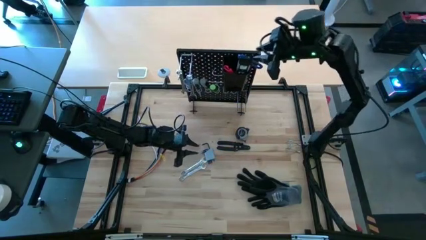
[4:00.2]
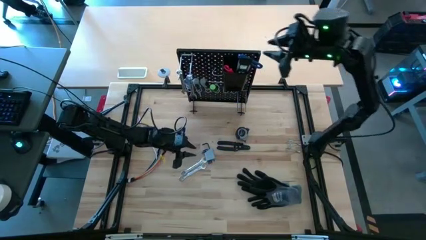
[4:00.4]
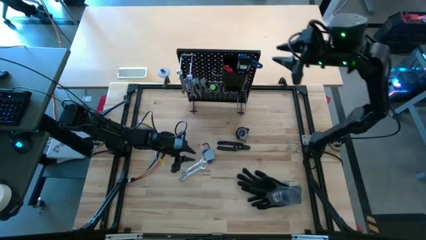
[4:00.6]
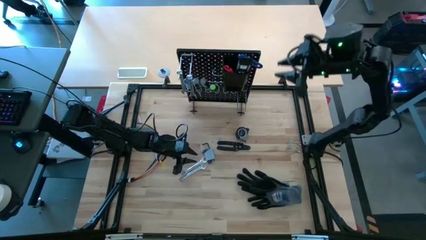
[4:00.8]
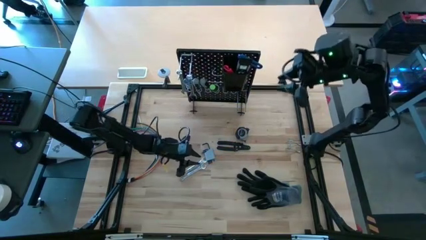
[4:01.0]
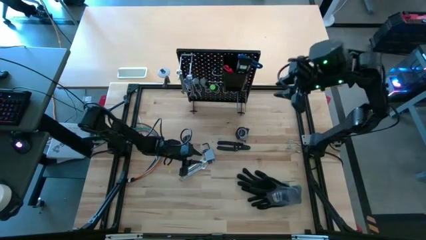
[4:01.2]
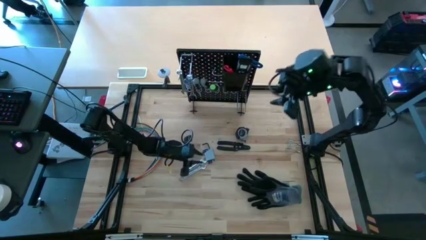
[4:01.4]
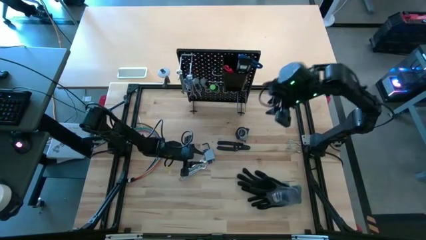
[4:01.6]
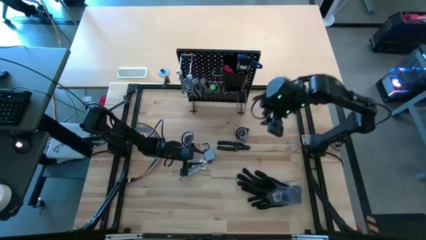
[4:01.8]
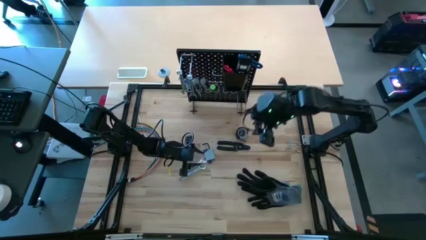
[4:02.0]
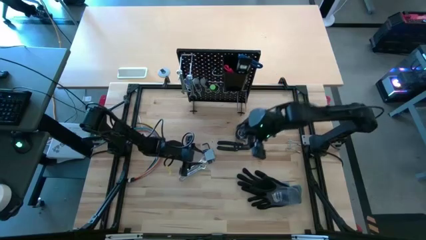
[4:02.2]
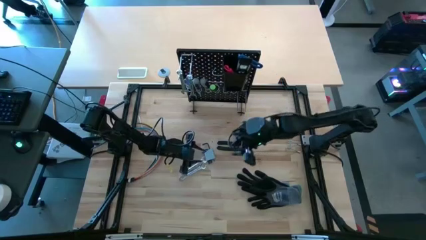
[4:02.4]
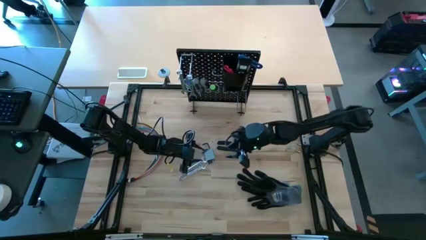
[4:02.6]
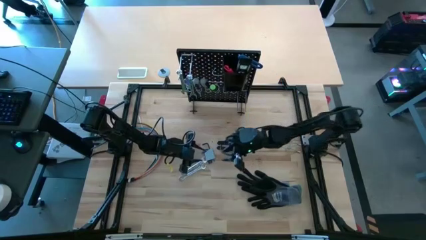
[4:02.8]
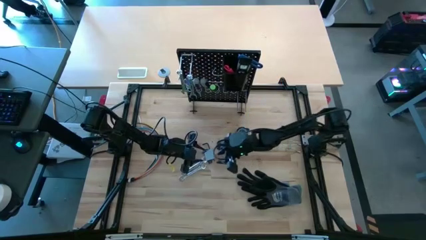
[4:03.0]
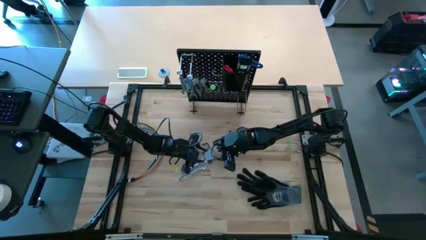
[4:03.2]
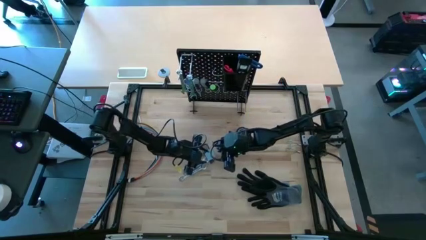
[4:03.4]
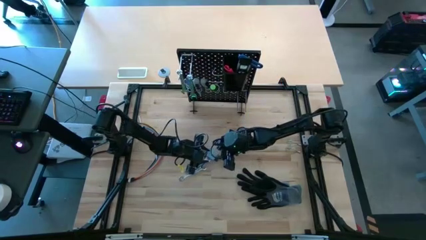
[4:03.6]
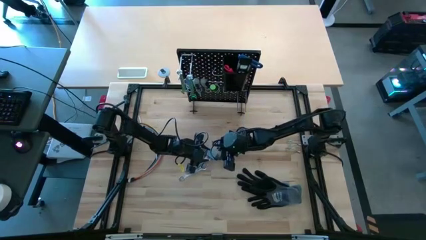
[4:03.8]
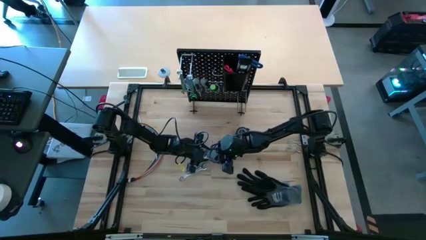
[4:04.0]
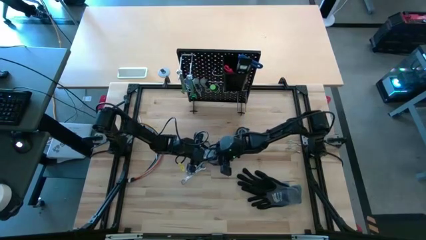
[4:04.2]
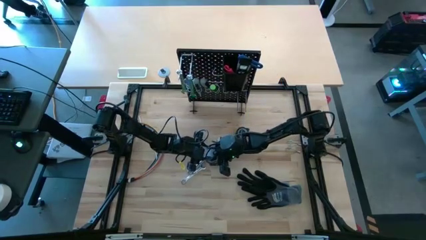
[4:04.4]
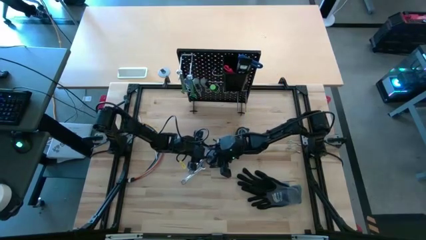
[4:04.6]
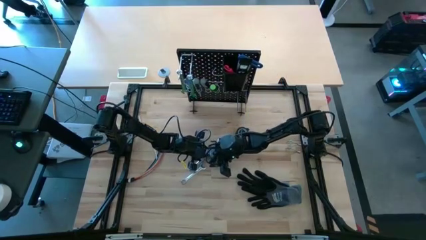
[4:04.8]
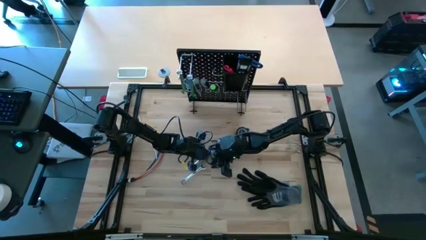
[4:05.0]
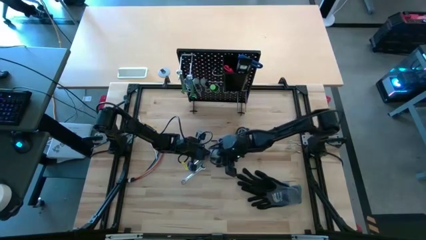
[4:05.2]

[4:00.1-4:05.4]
Task: Hang tools onto peg board
Put the gray hex key set into the black bin on the peg board

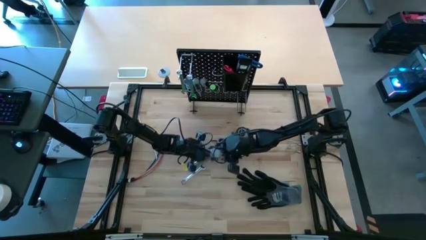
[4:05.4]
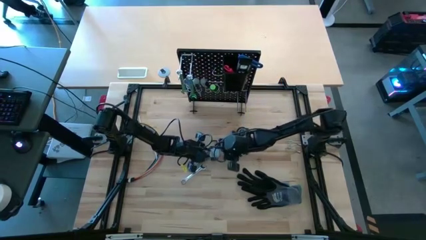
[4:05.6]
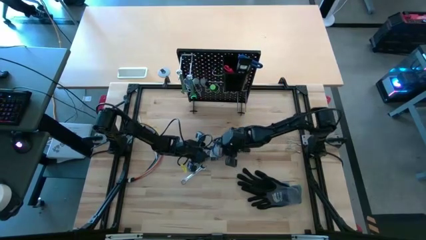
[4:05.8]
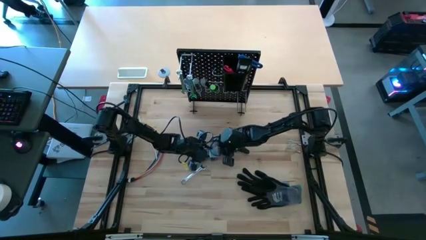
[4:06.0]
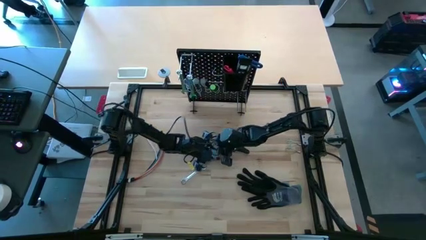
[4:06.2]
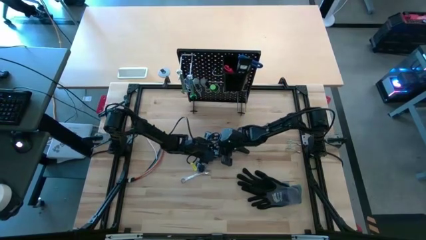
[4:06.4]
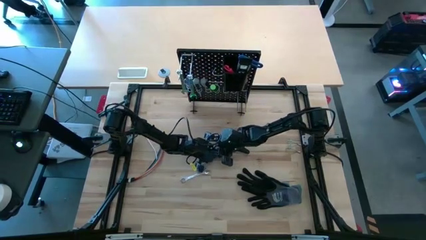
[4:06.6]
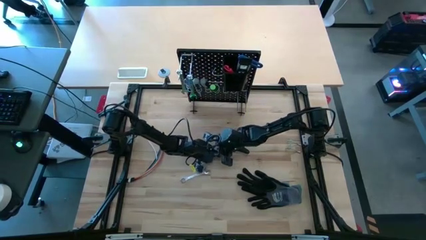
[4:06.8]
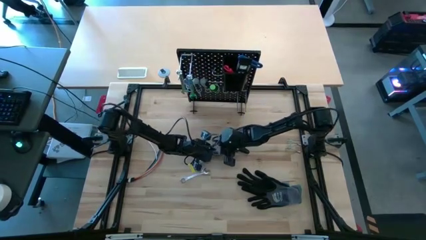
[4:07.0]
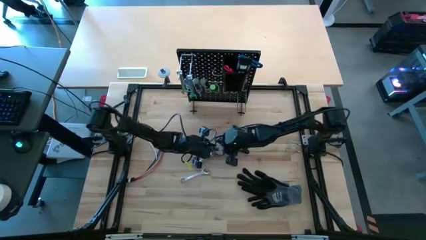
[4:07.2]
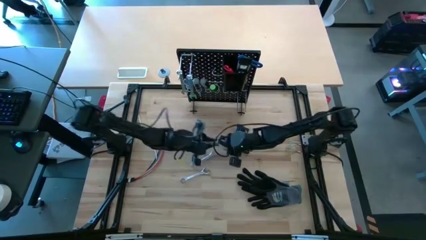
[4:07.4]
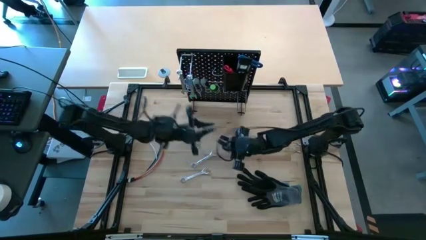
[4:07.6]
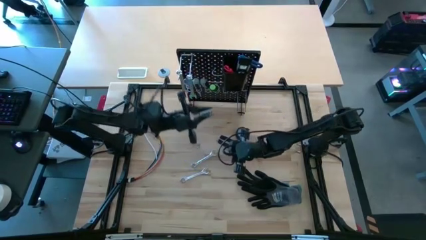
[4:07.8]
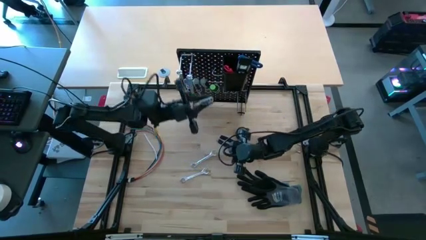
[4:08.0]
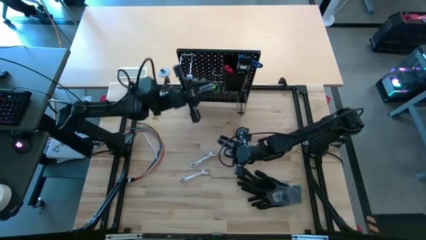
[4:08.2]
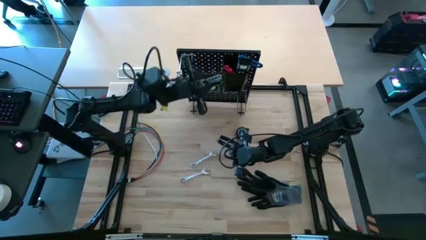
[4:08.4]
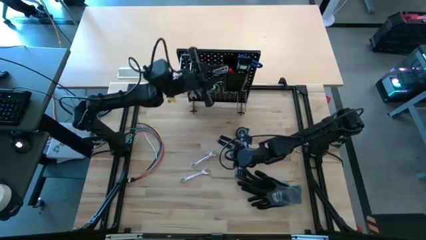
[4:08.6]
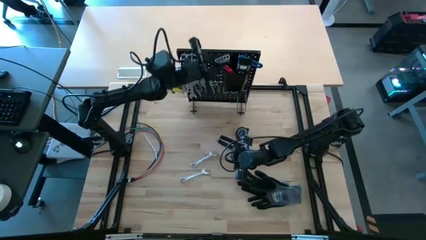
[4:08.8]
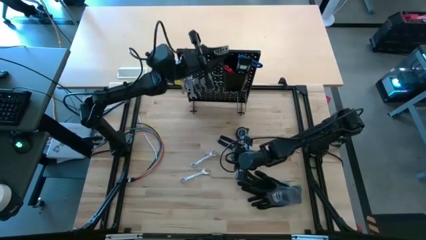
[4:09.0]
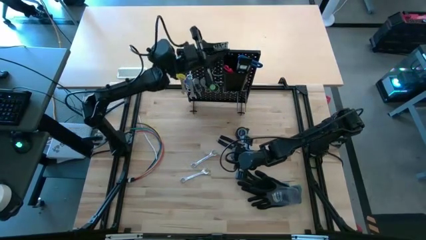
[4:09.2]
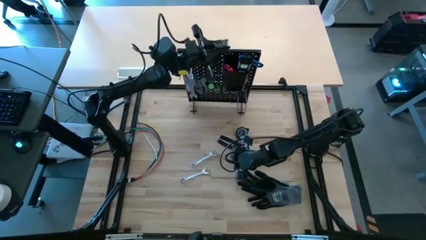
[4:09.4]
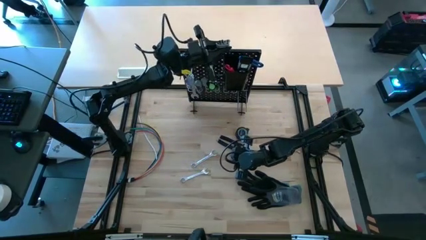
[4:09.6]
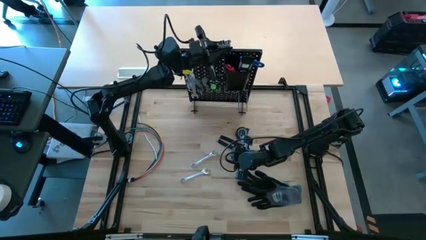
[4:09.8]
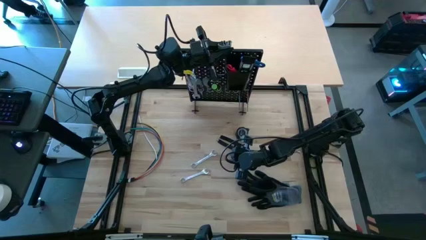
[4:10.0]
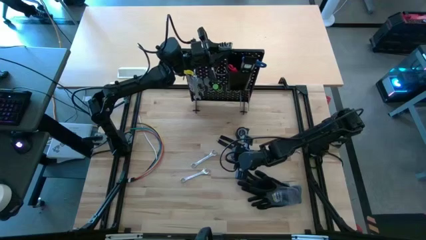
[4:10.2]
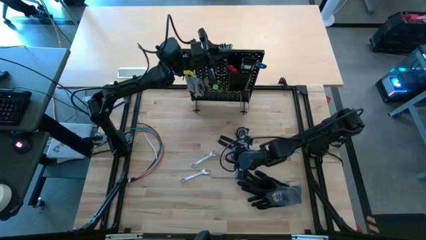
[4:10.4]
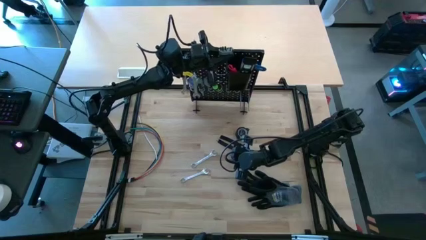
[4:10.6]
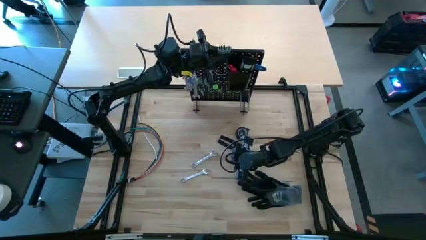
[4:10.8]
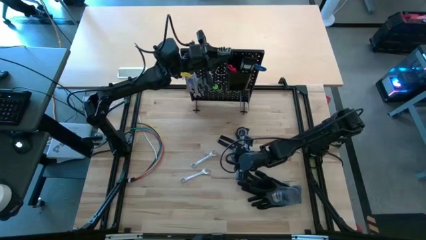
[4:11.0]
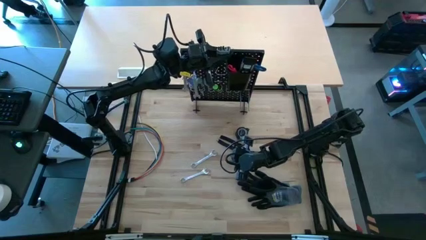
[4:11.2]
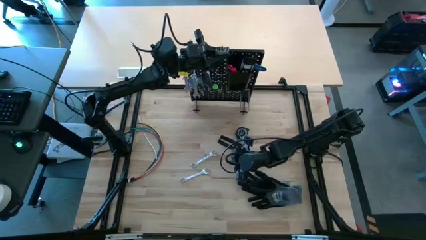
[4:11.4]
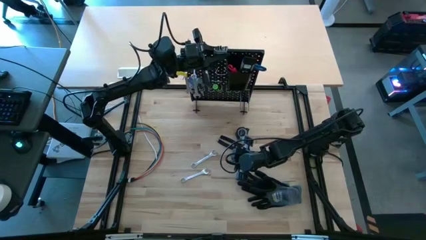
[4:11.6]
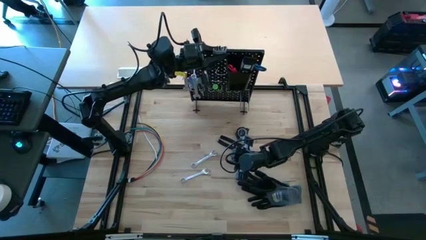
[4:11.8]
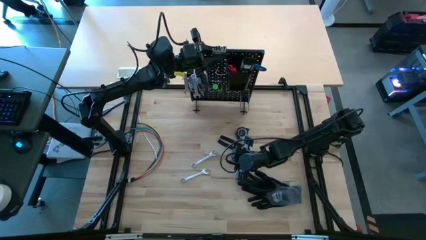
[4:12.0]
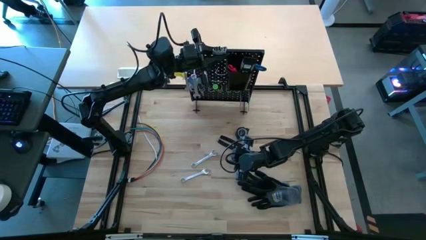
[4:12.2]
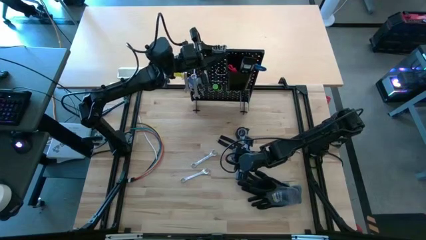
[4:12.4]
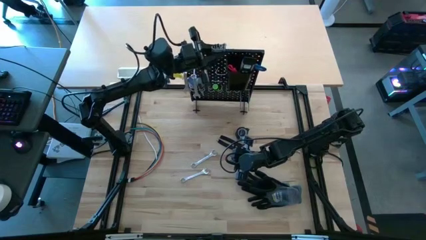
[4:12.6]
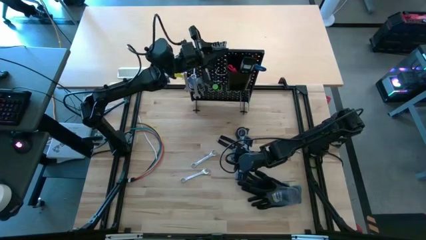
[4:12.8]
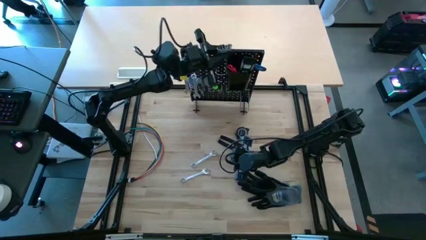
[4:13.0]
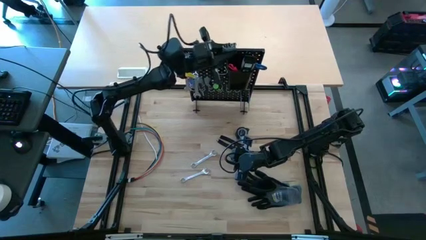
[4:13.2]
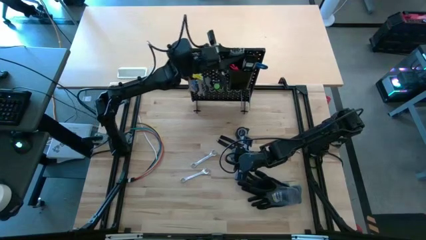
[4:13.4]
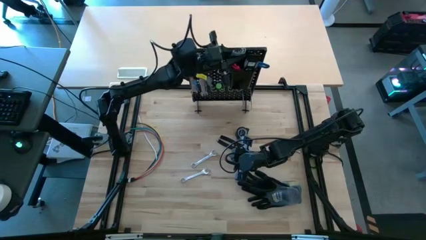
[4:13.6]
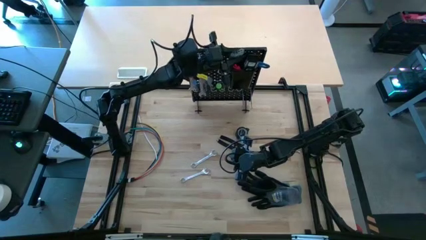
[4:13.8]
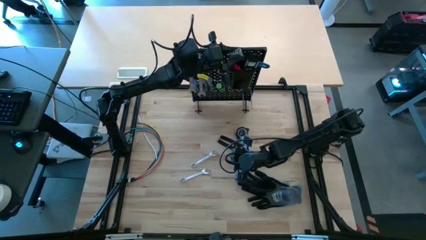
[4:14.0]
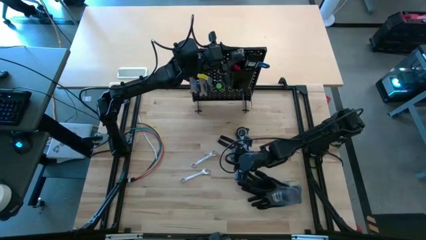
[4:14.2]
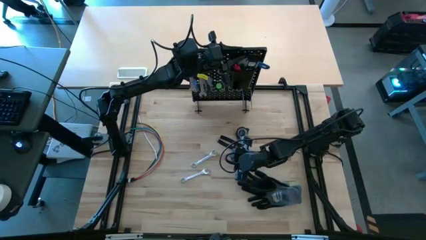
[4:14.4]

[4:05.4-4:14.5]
Put the gray hex key set into the black bin on the peg board
